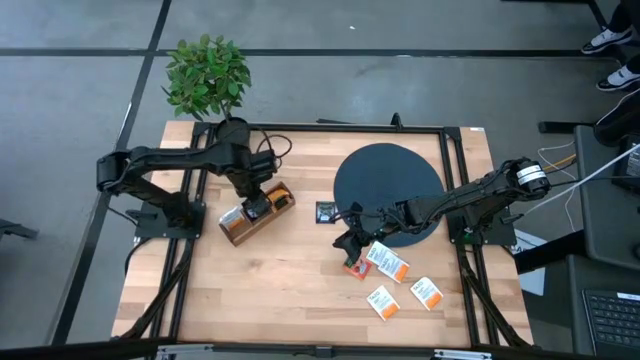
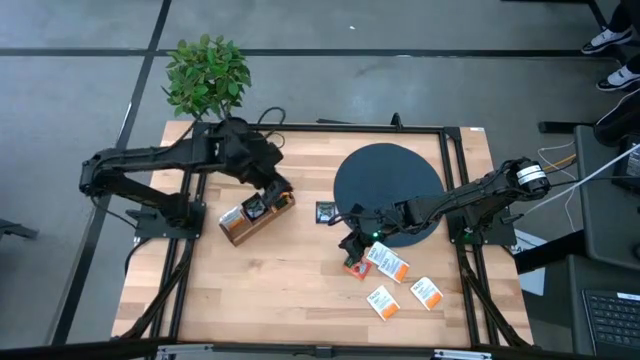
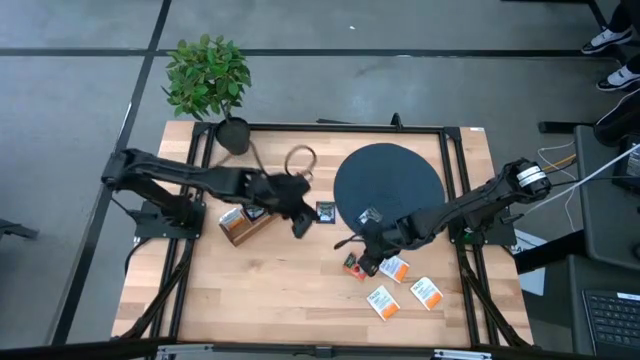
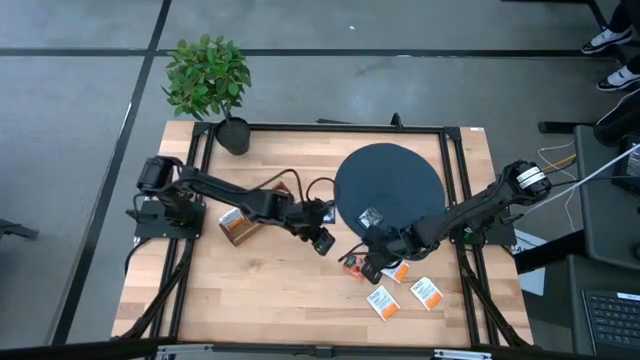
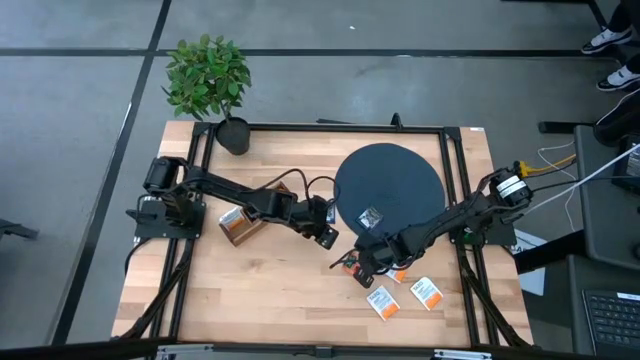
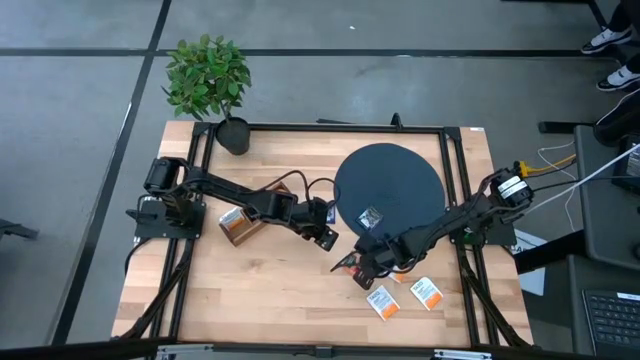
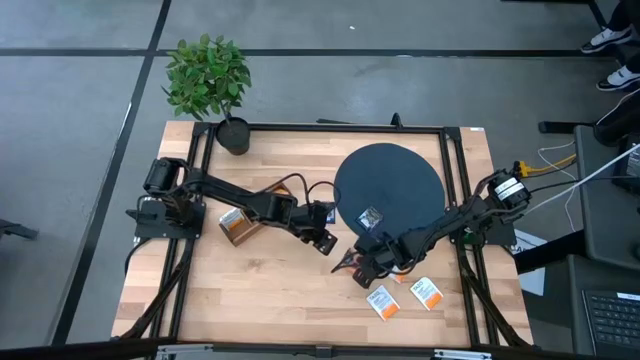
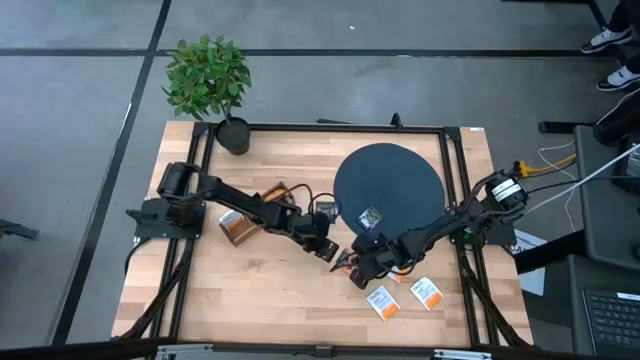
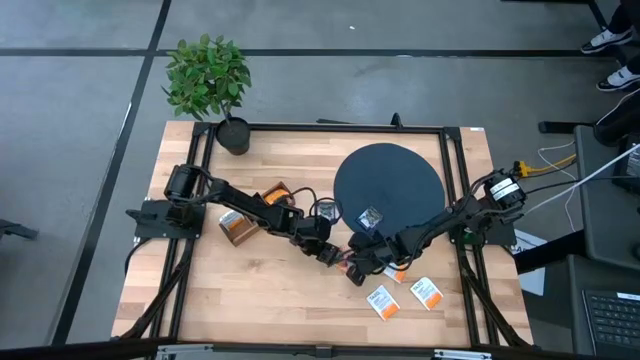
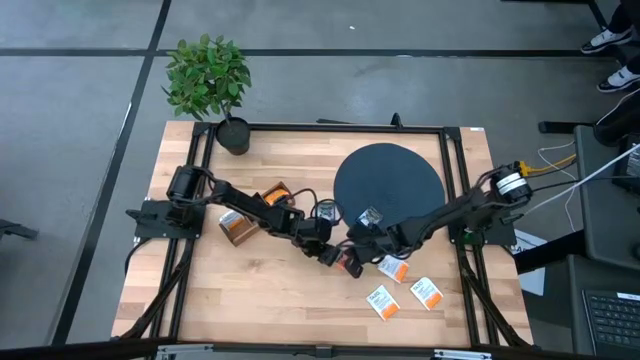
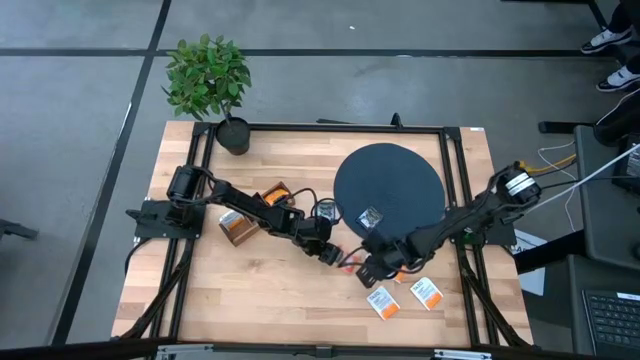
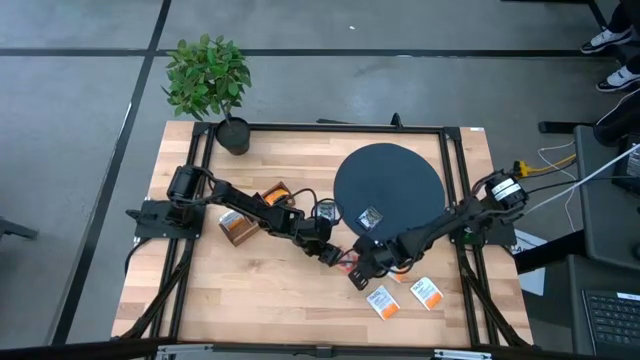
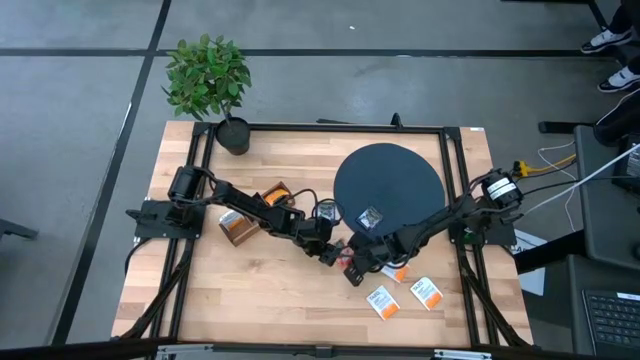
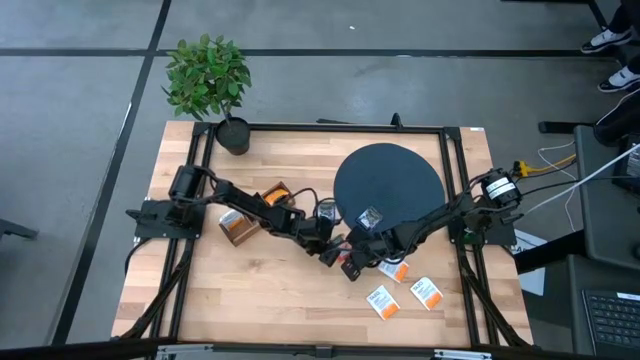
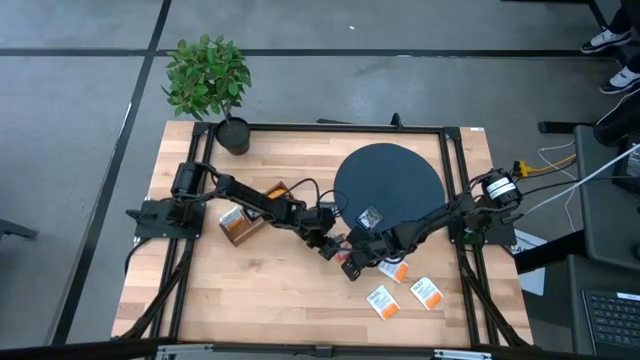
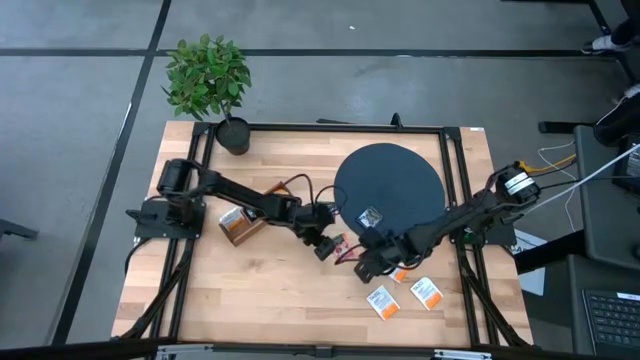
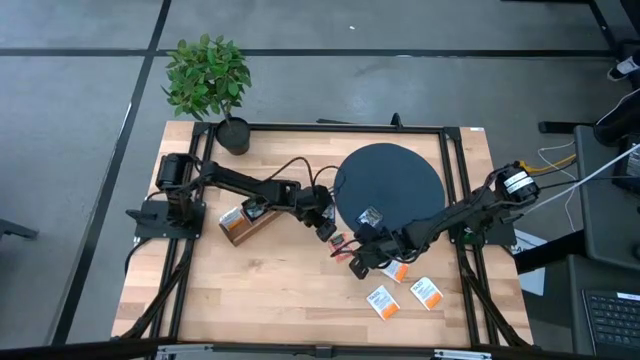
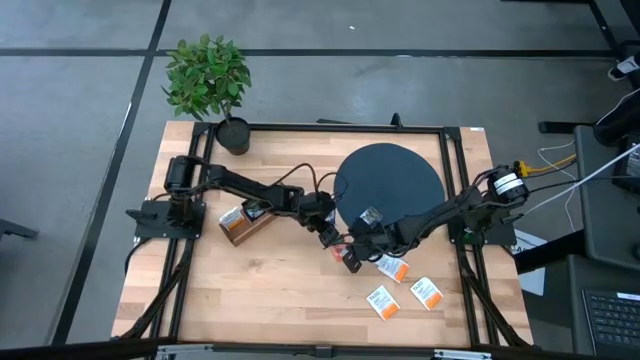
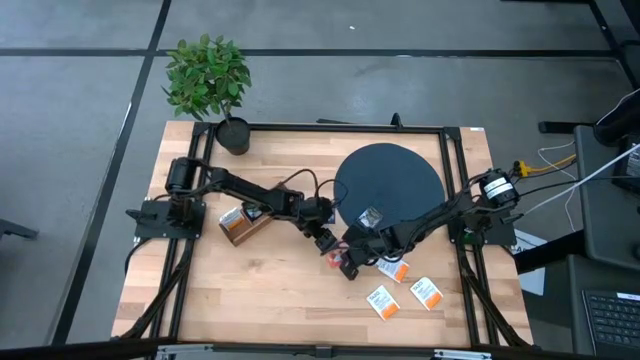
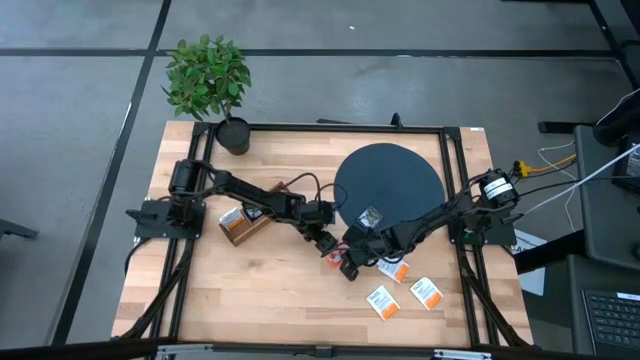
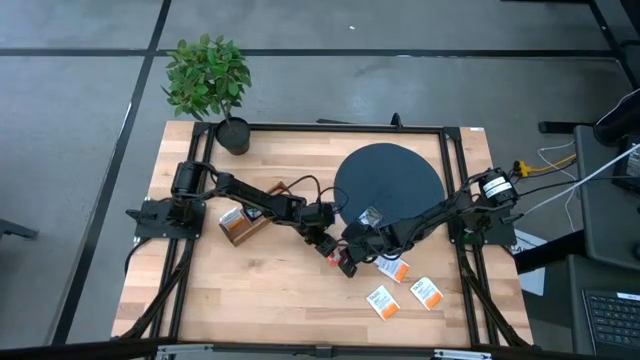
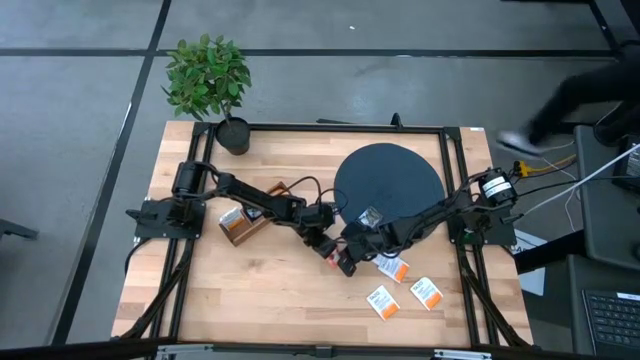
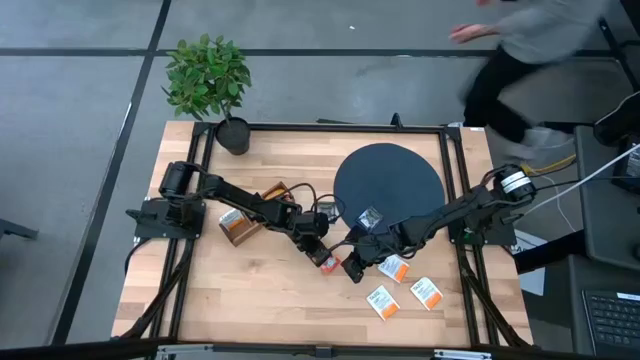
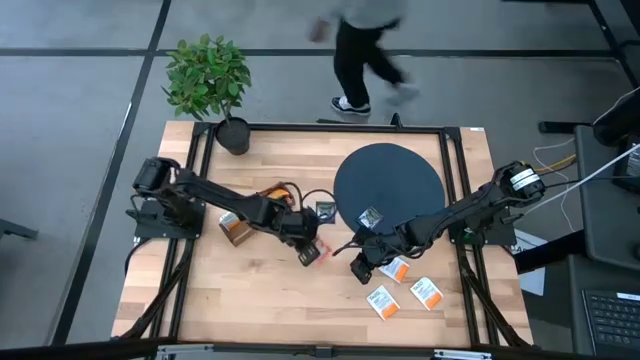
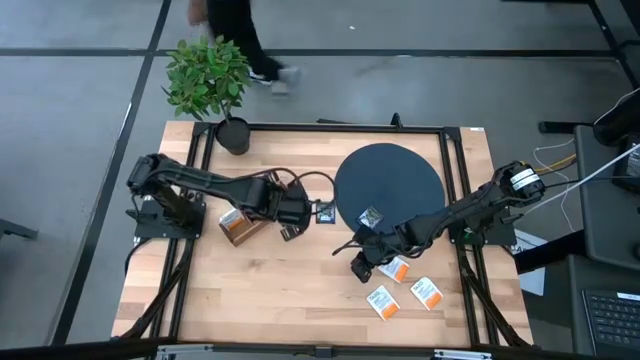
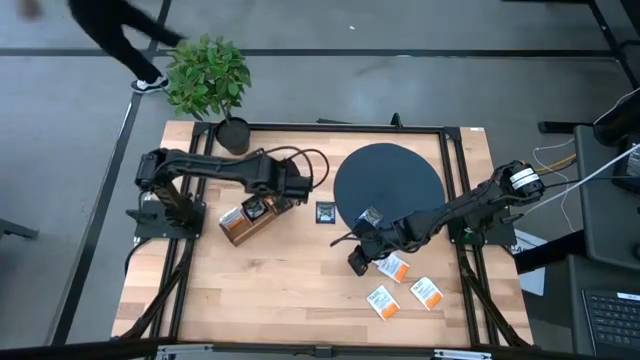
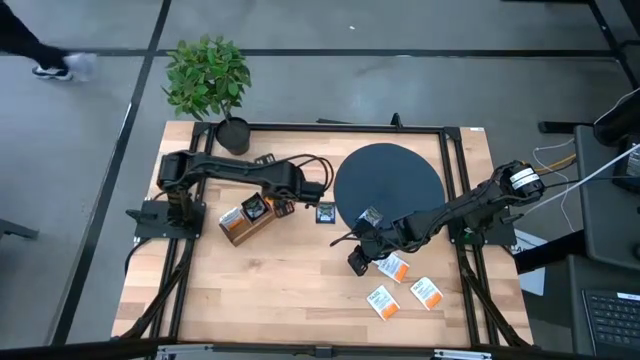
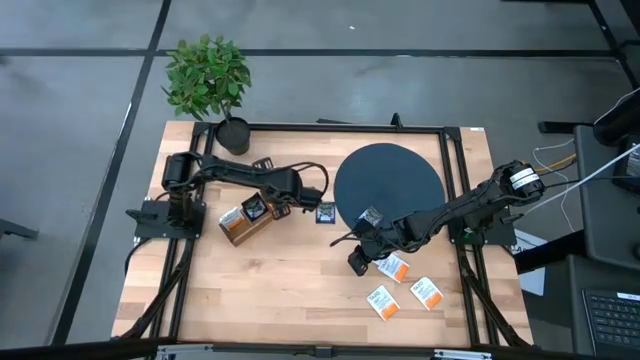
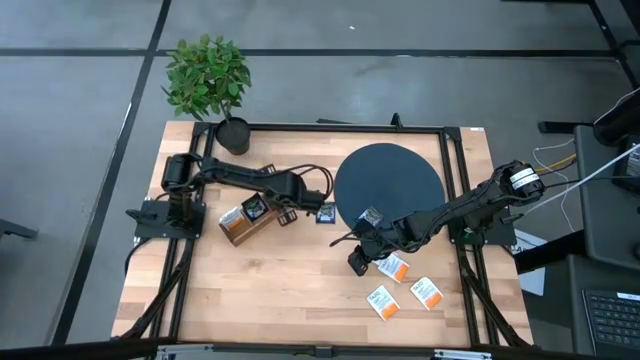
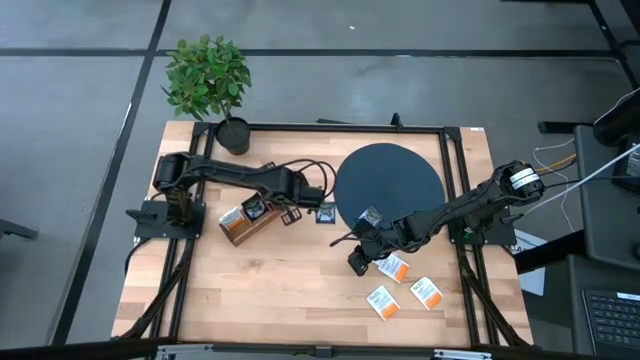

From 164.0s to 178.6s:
Task: Pick & Place Tea
Put the orange tea bag into the right section of the wooden organizer

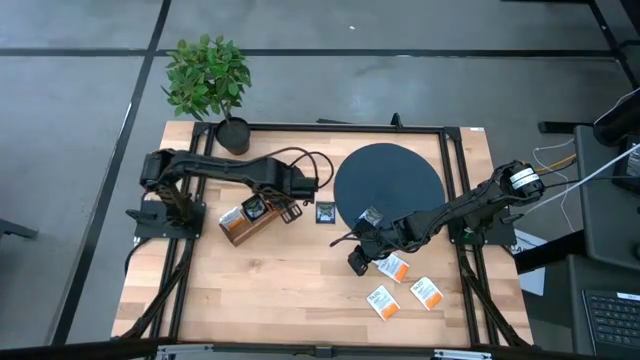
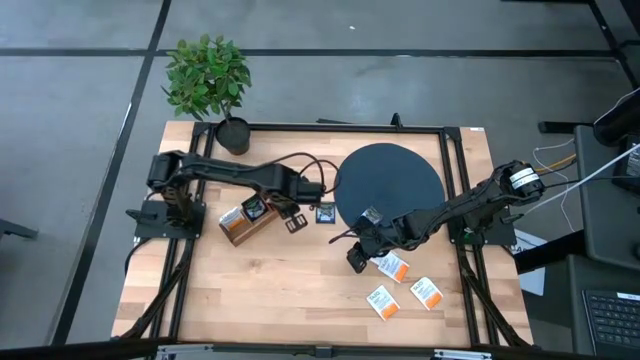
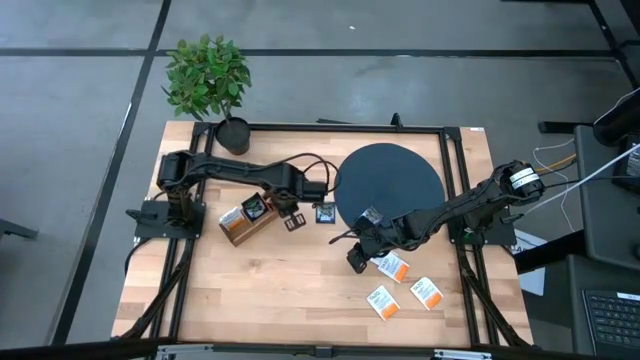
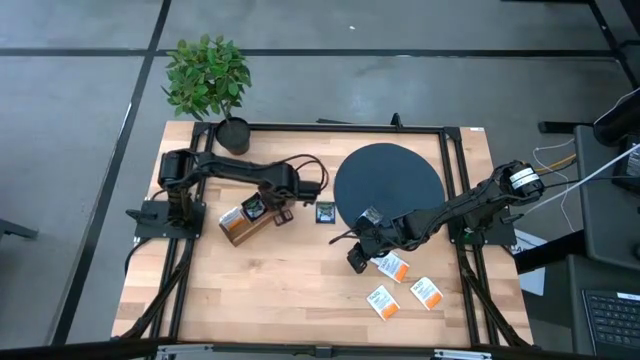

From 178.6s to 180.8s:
Adjust the orange tea bag in the wooden organizer

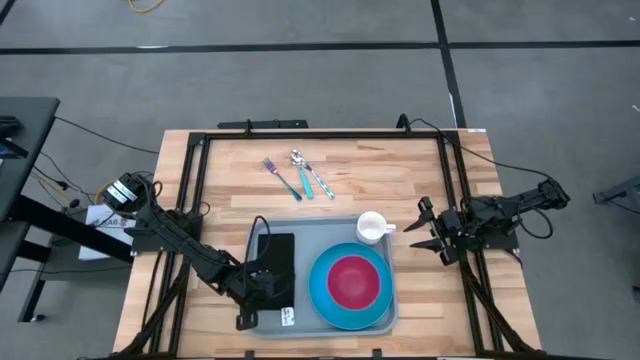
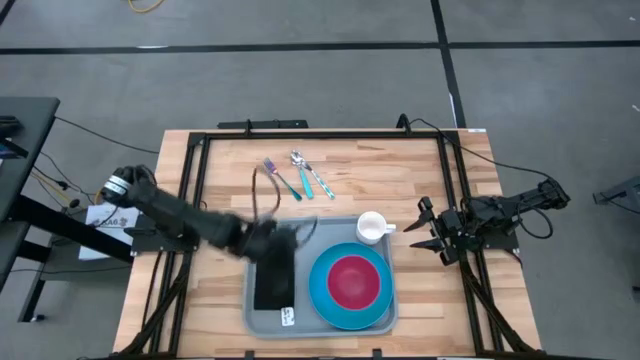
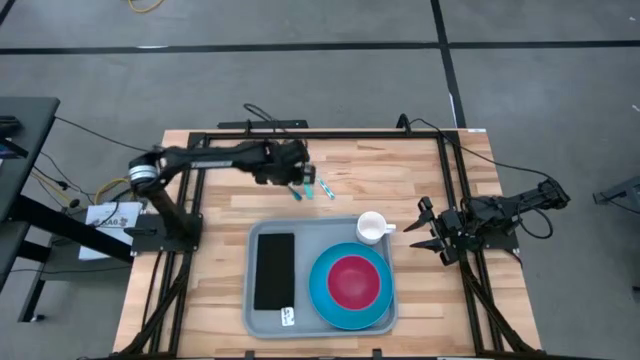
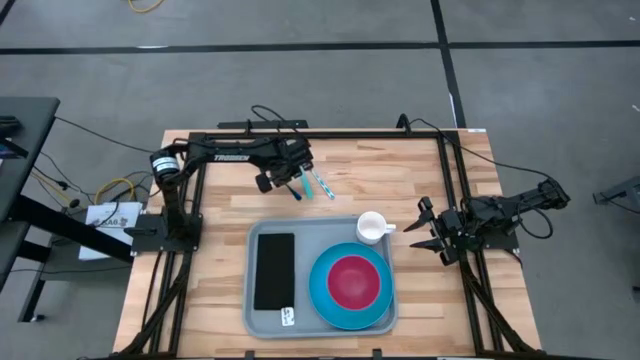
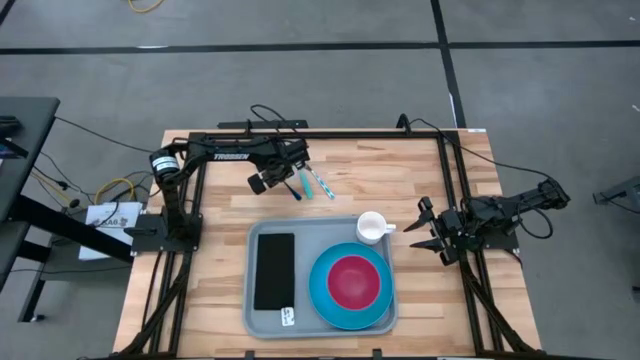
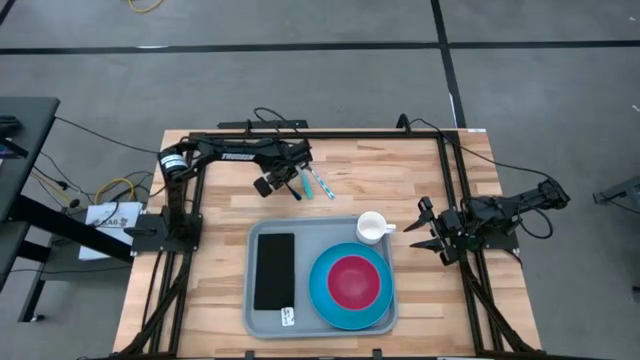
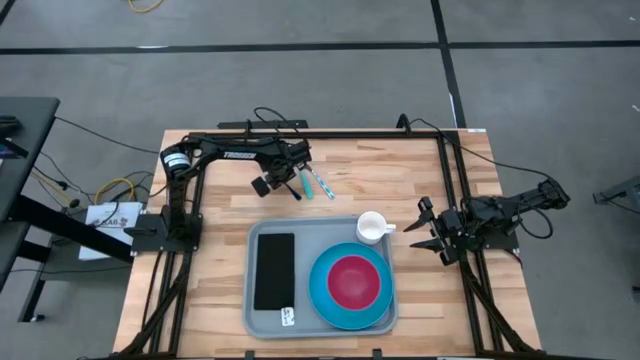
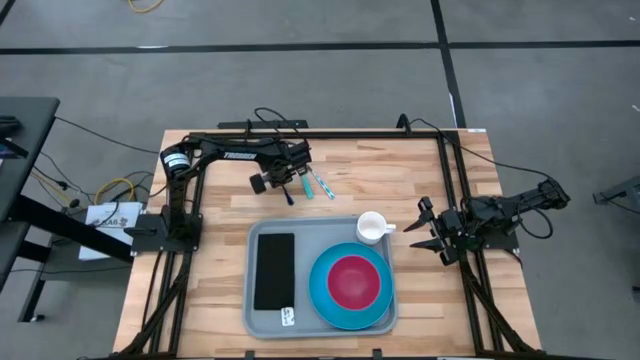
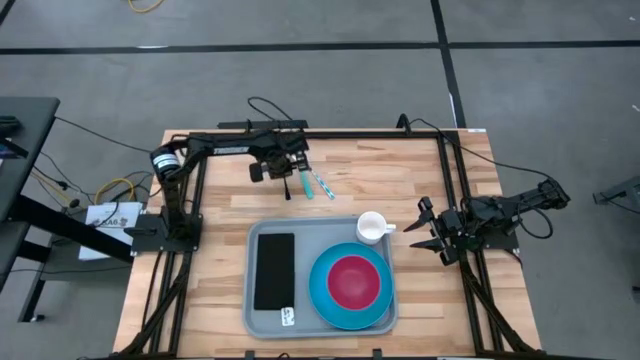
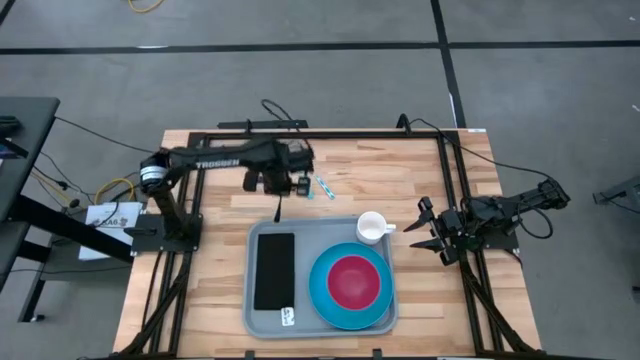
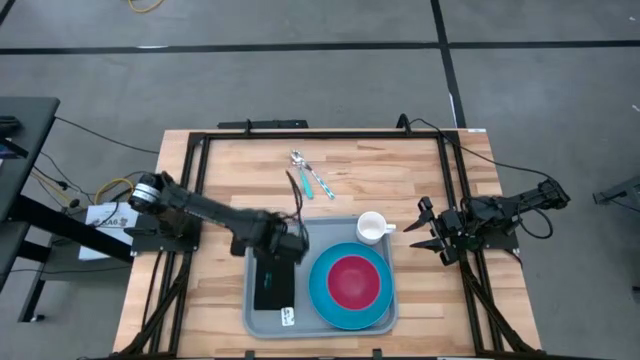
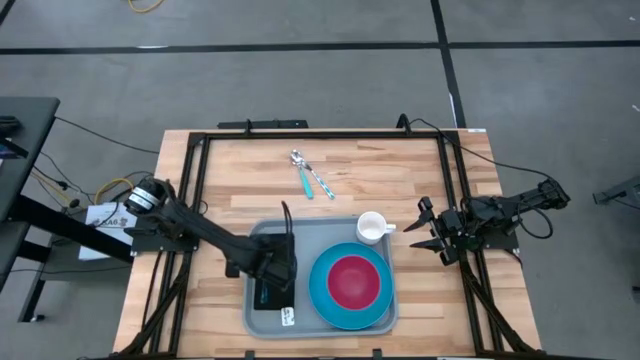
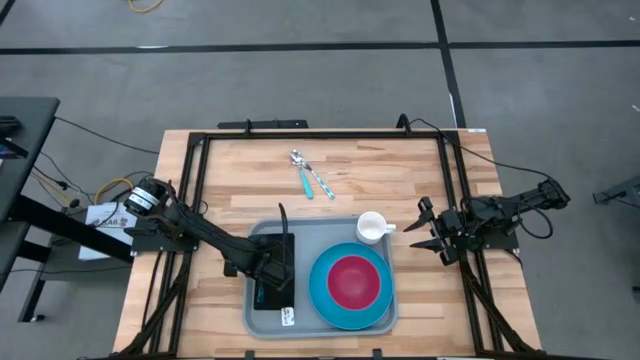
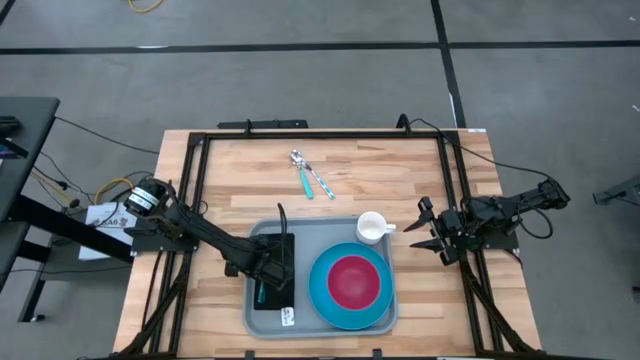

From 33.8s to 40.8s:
Task: Set up tray
Put the fork on the black table napkin
